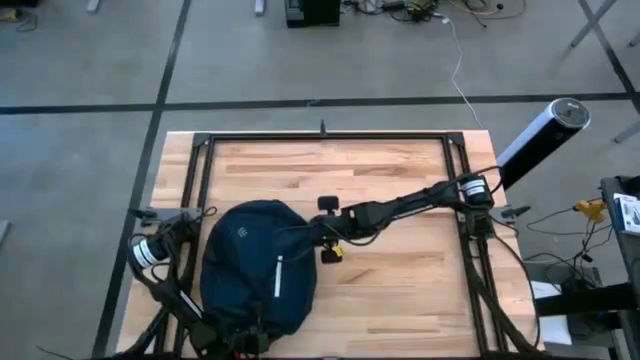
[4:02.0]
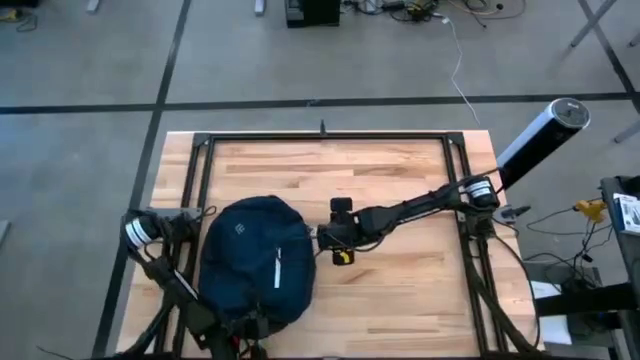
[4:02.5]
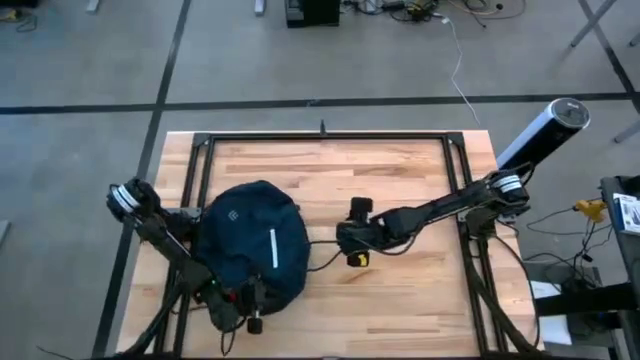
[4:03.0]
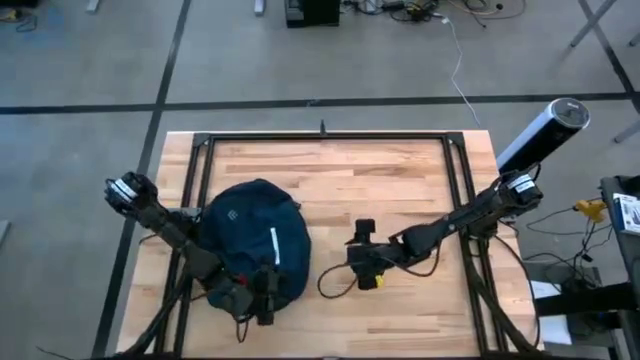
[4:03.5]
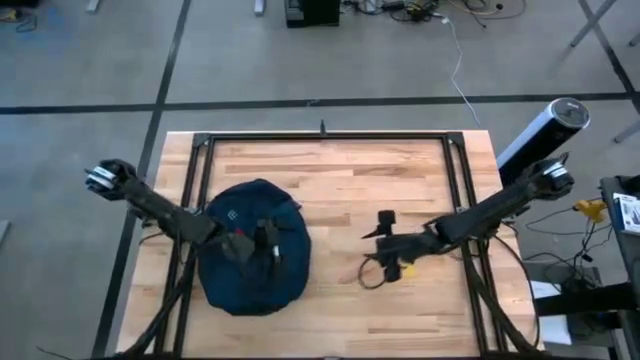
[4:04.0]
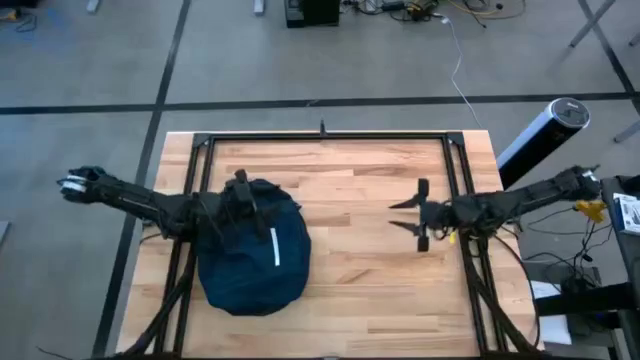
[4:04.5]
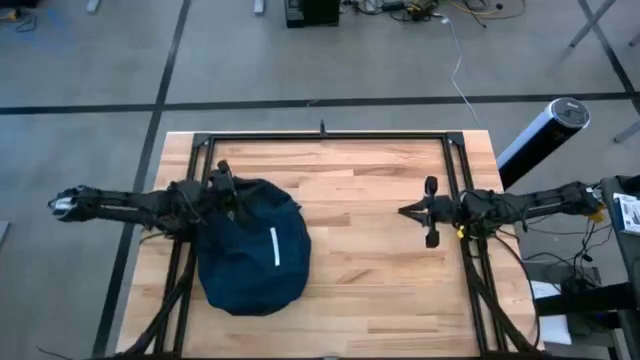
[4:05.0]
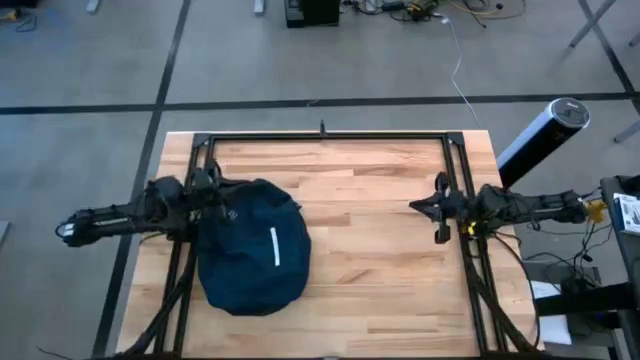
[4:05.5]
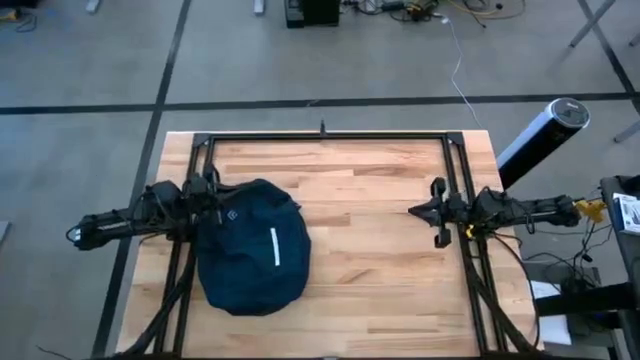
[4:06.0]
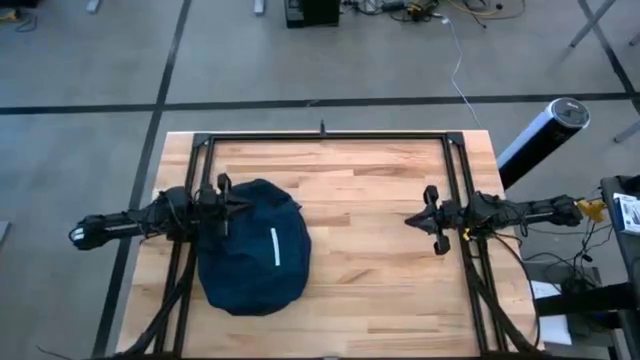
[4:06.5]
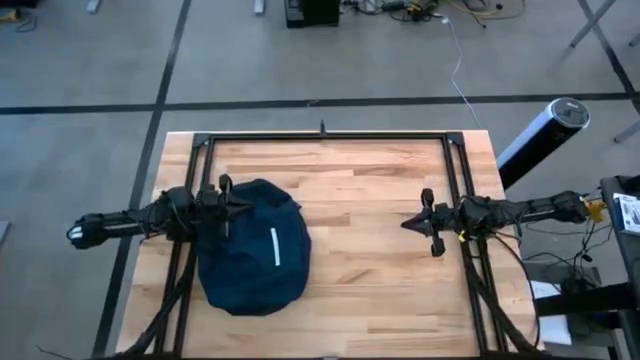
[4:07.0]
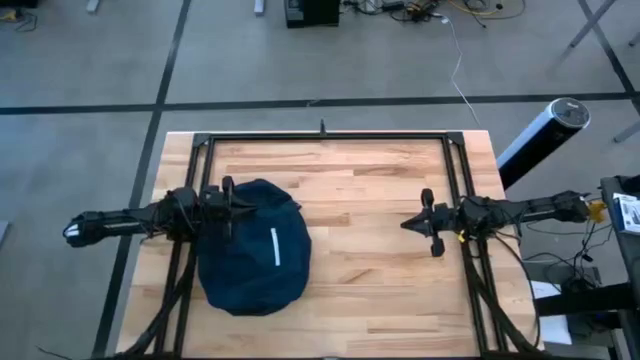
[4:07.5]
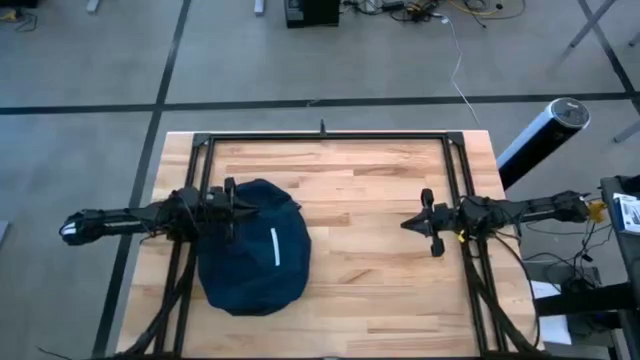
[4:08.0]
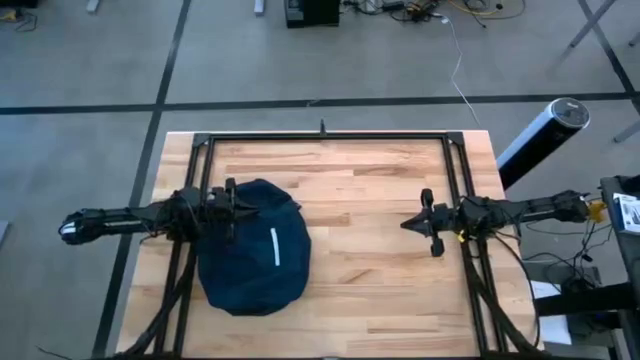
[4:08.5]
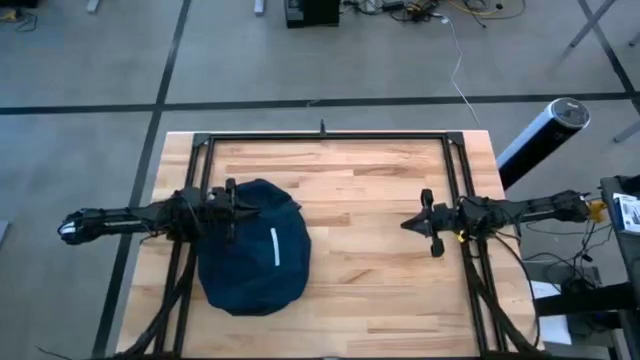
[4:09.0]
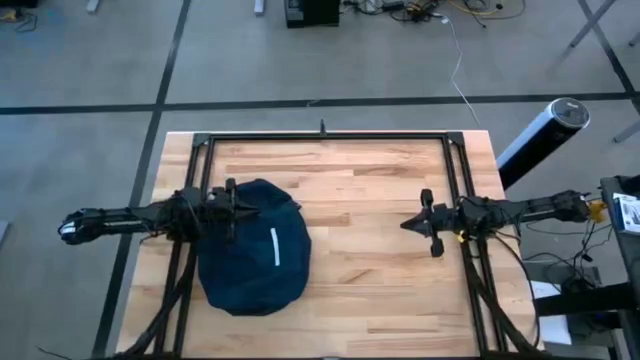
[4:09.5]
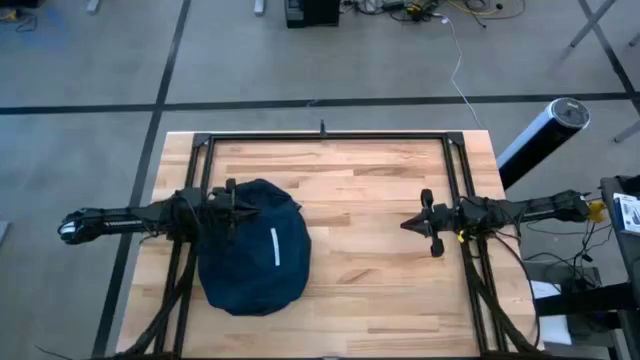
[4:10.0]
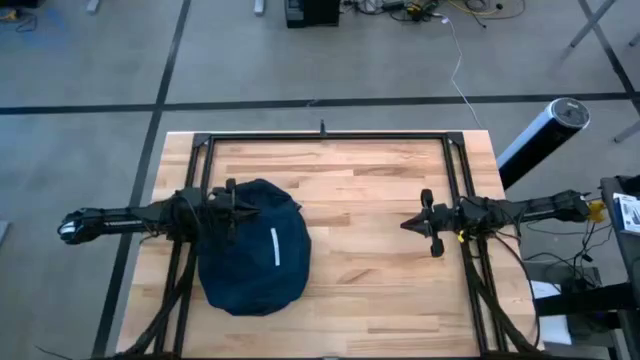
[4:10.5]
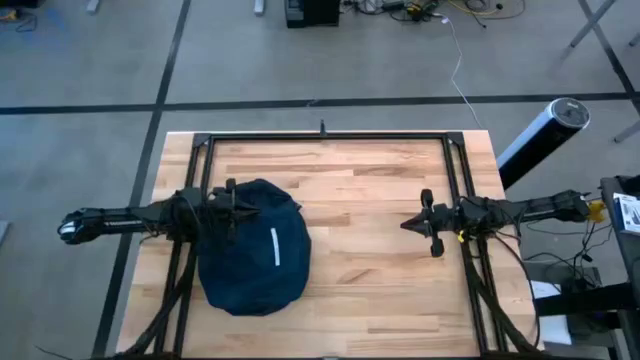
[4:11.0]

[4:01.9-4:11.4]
Task: Unpack backpack
Return to Home Position

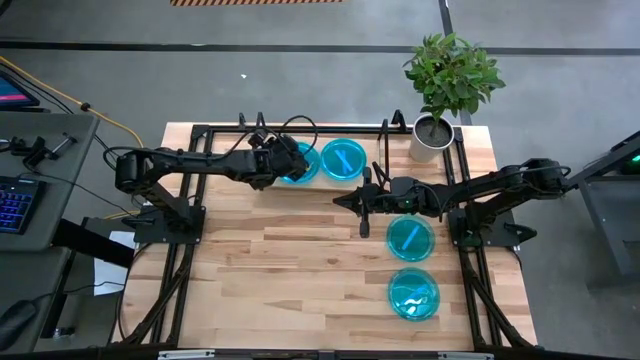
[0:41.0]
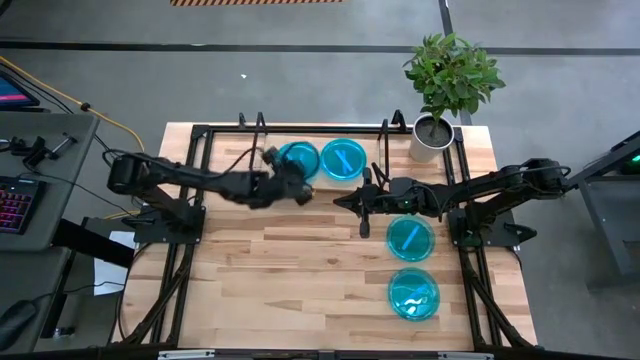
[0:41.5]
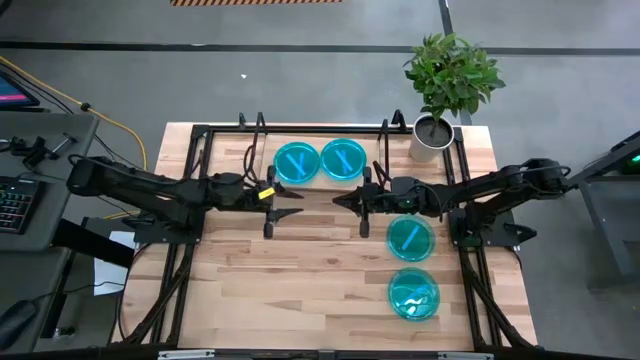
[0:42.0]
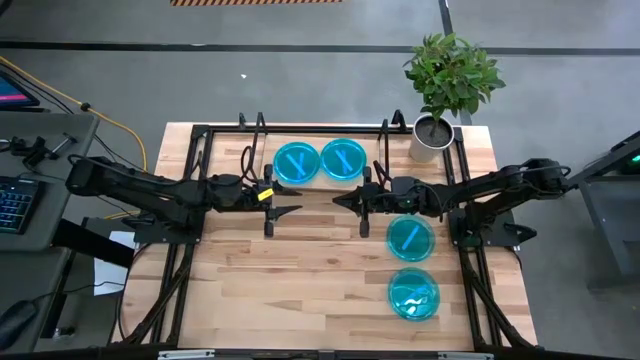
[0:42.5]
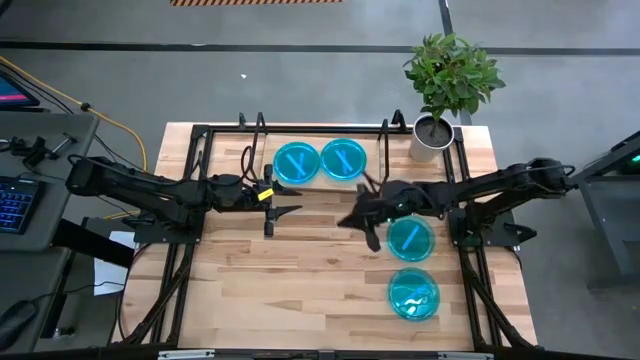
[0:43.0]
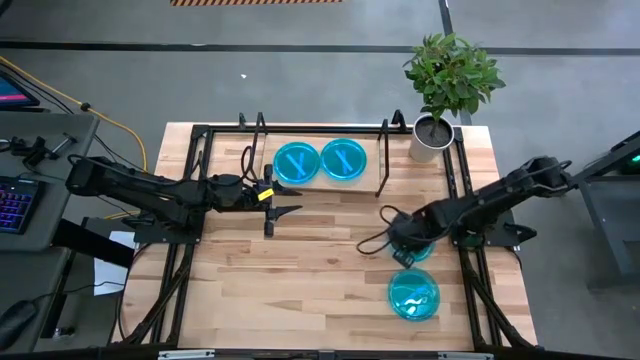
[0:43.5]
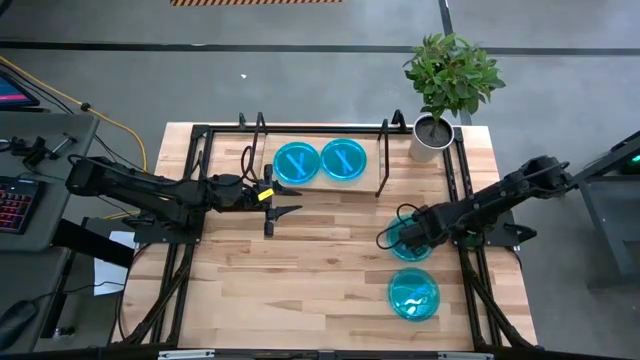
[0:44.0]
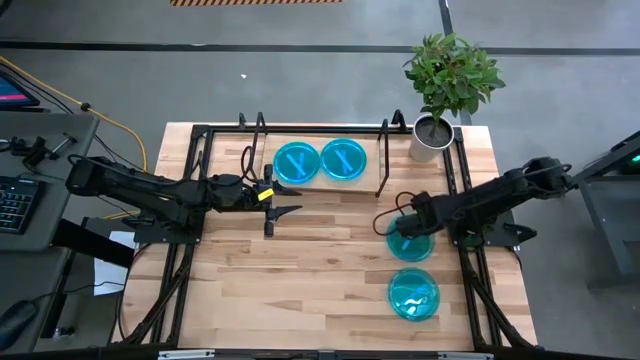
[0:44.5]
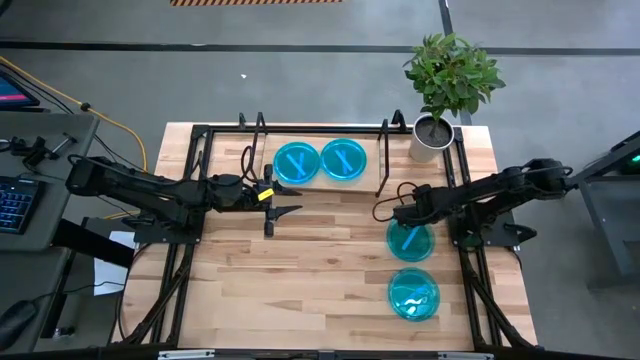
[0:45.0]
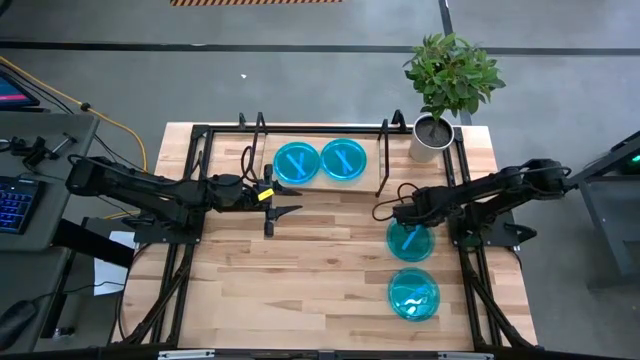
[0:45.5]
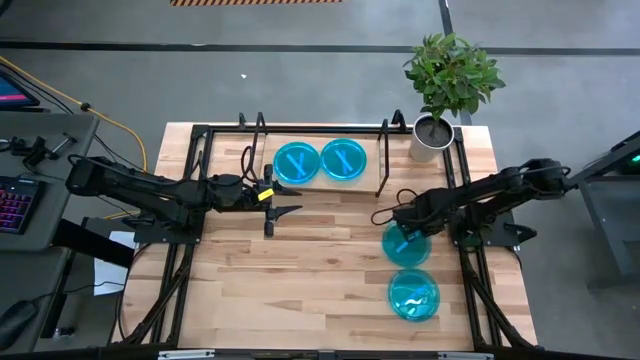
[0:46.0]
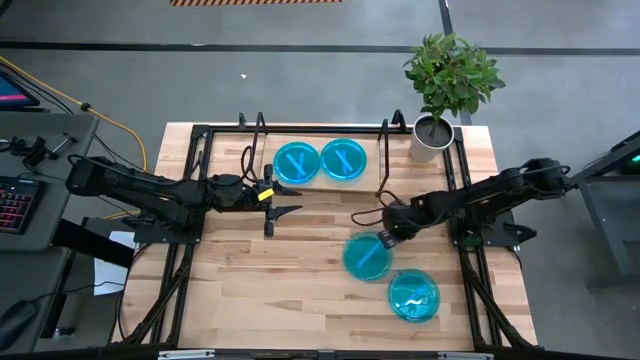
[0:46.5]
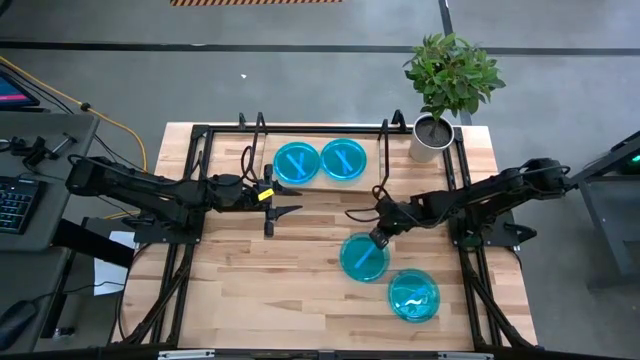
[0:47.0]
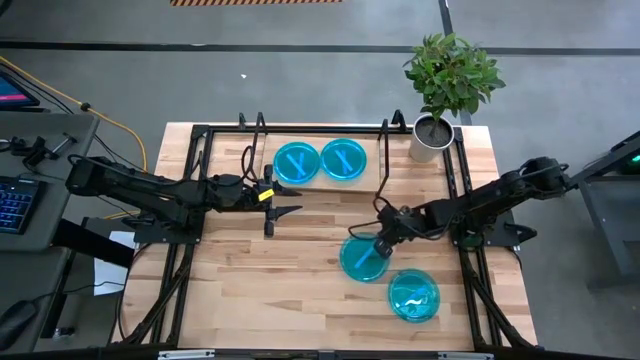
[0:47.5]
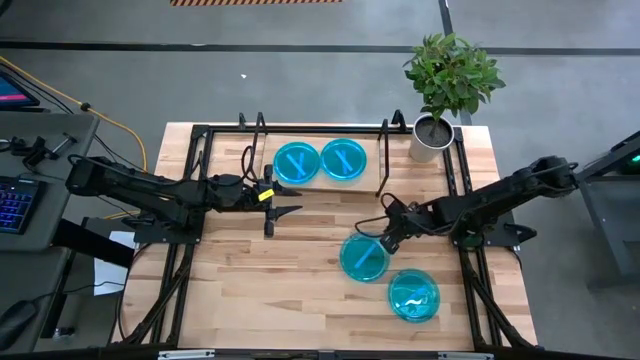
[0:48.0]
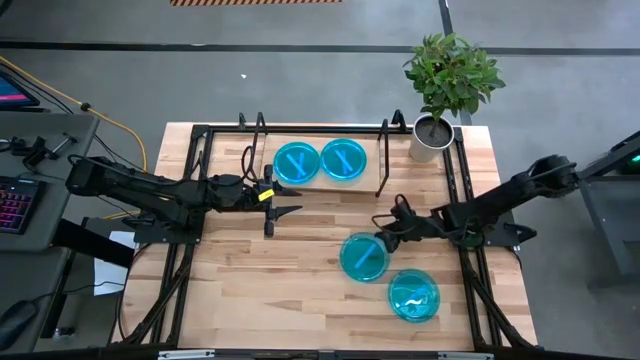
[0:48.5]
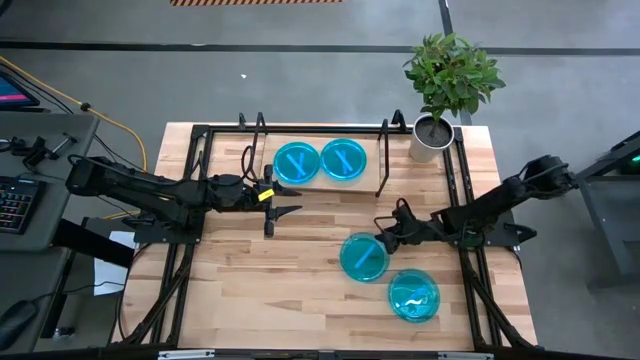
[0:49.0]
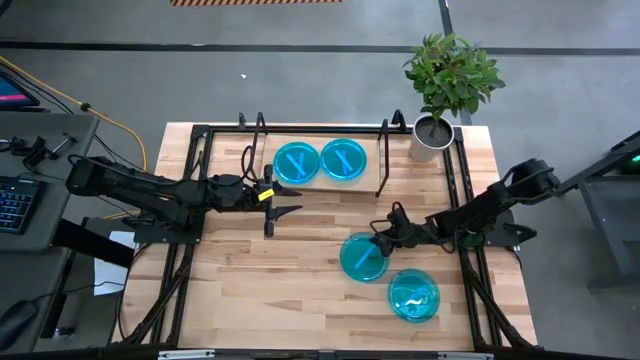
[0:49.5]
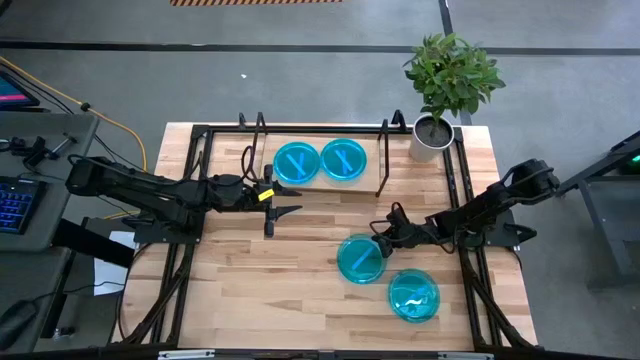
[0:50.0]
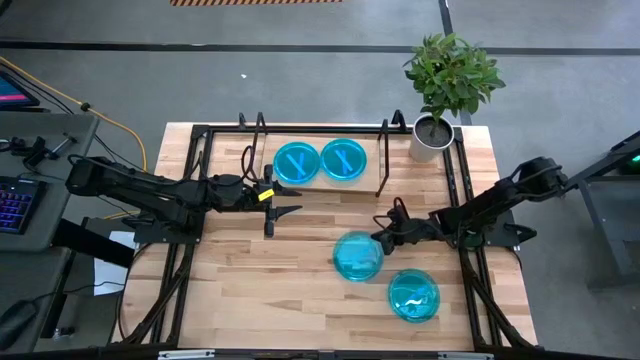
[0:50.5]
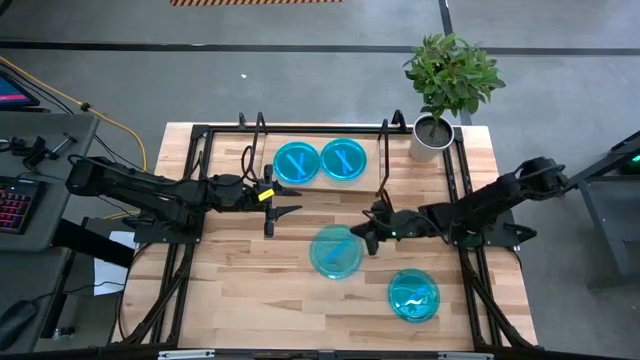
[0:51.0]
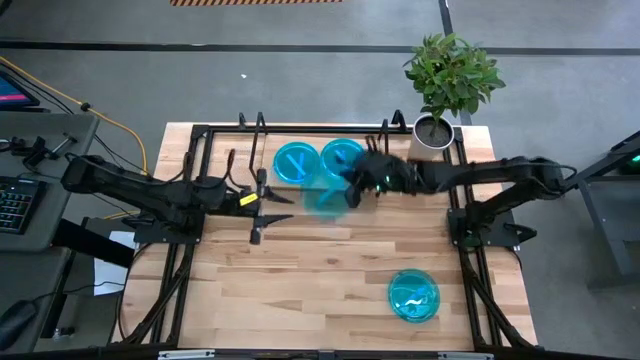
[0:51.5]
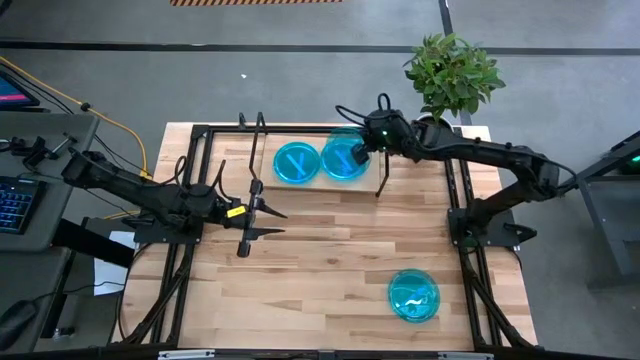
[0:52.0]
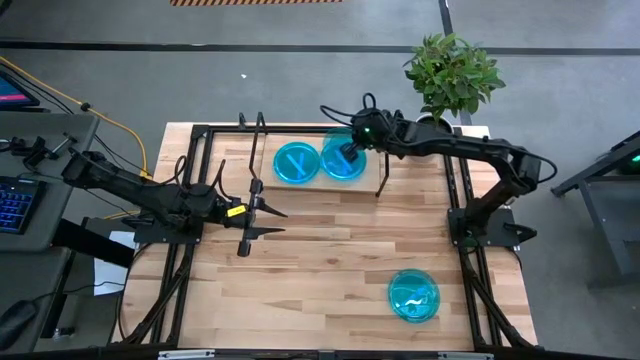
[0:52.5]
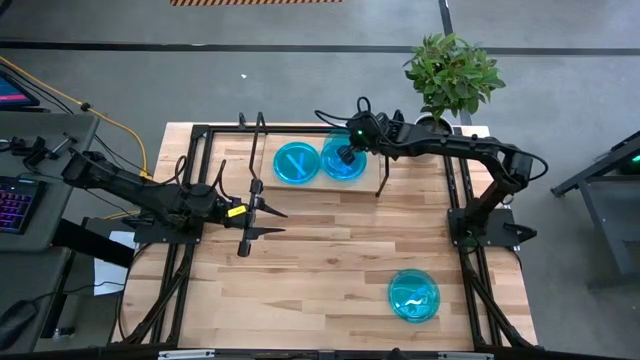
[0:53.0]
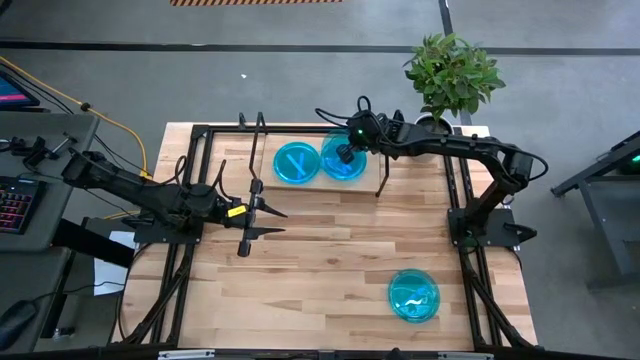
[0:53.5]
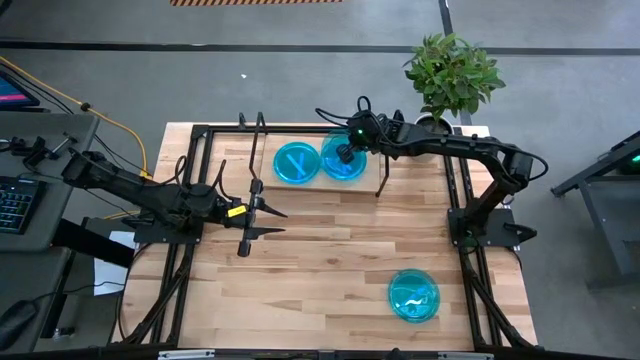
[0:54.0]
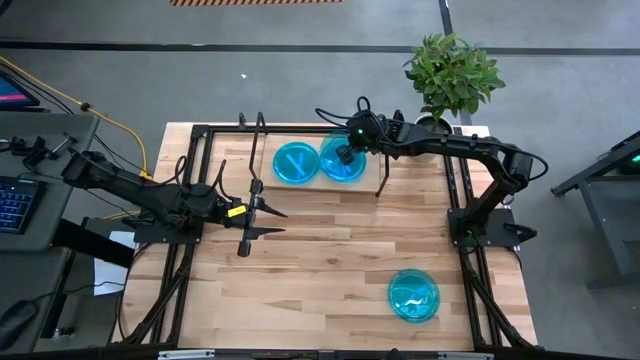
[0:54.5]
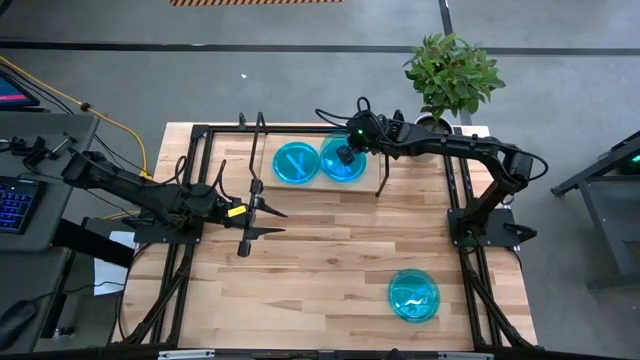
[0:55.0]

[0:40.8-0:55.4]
Task: Place and stack plates onto a shelf
Stack the blue plate on top of the blue plate on the shelf
